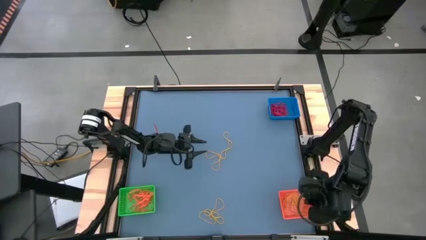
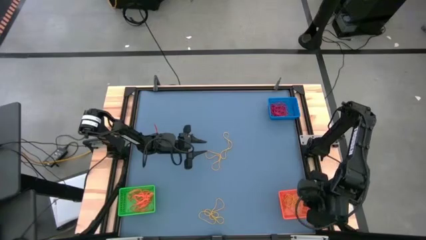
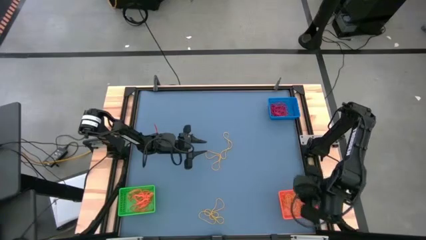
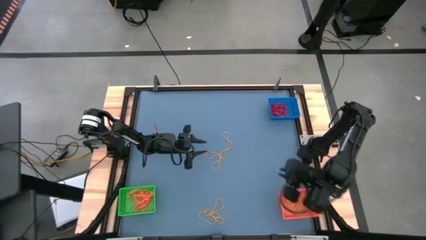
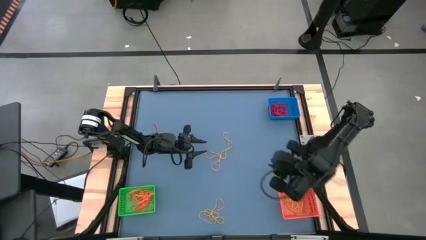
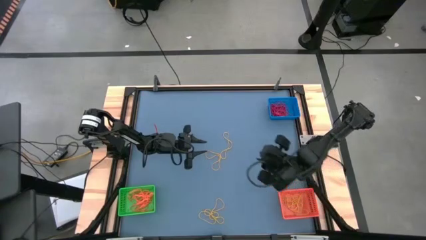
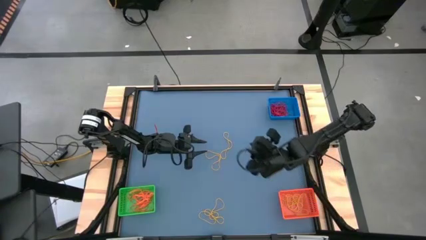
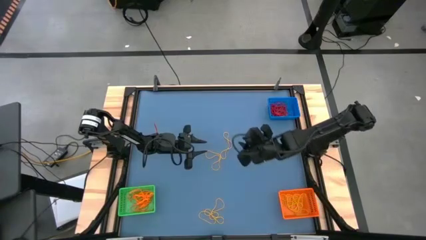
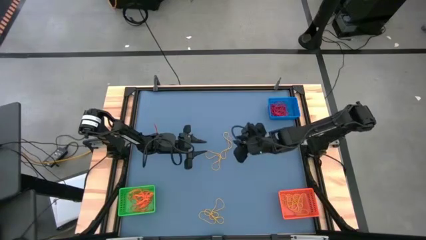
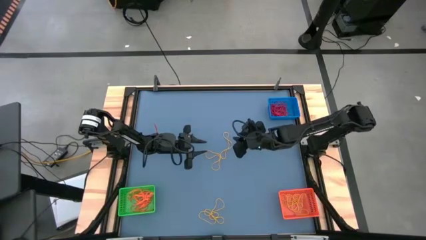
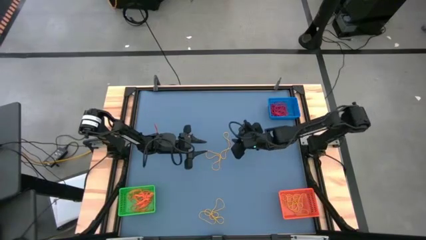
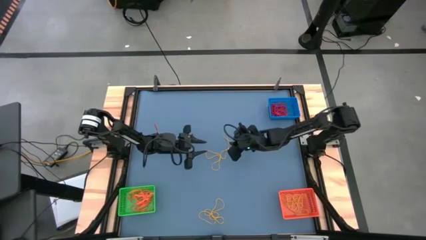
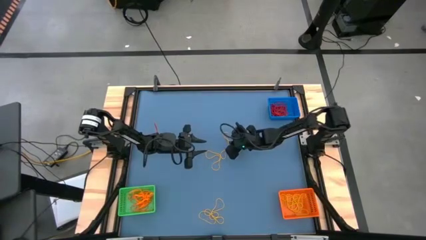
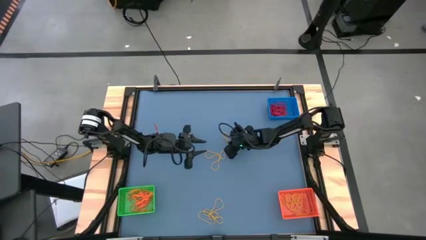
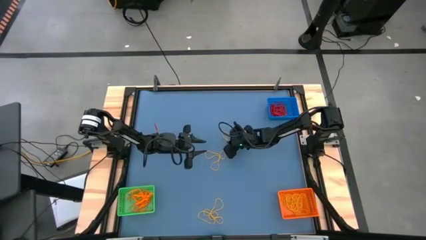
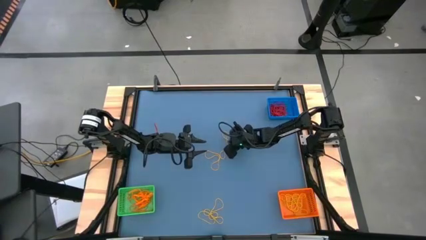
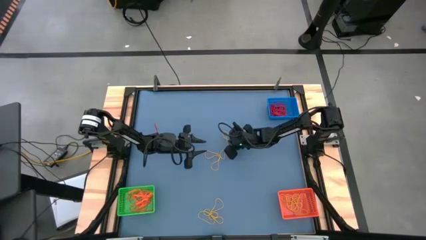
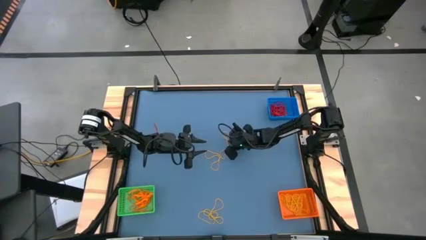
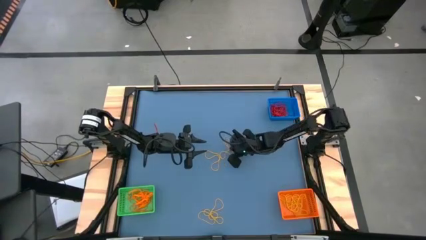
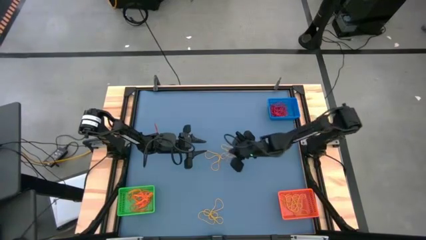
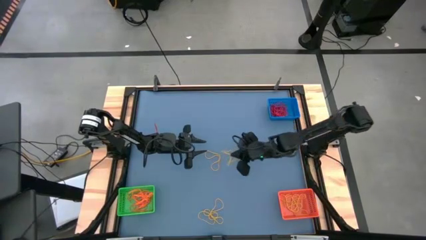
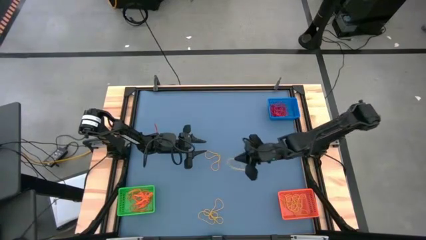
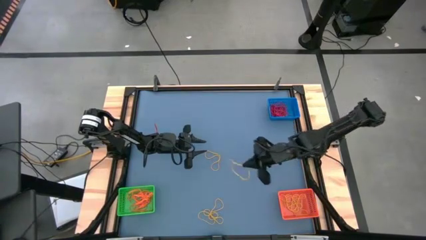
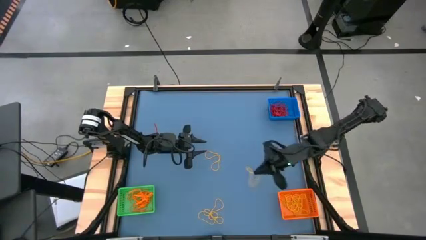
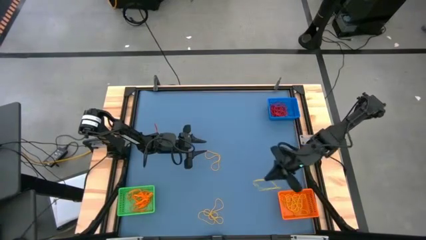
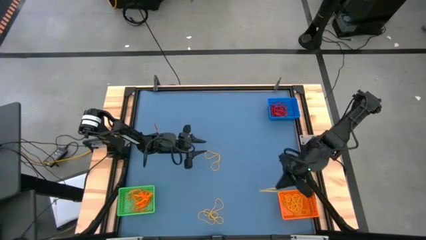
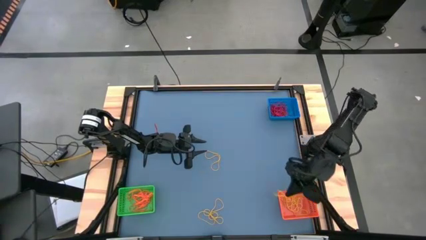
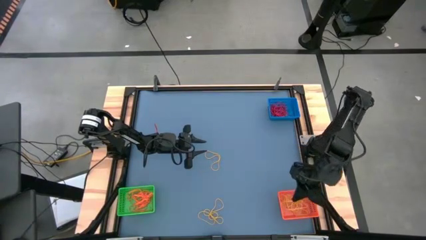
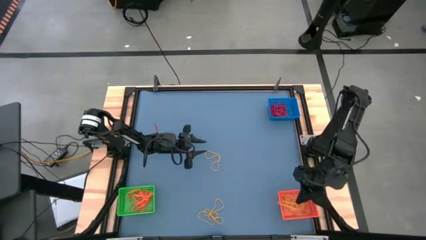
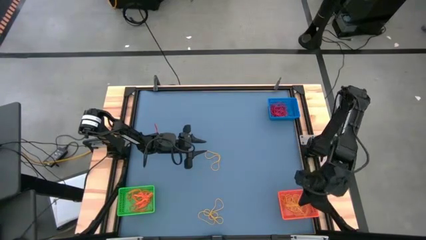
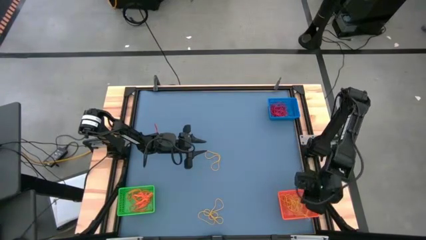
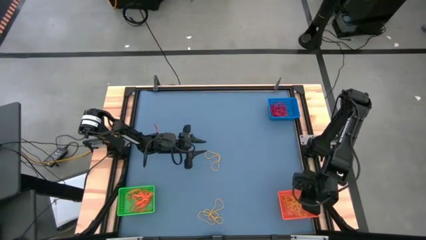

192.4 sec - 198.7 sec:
Task: Sort rubber bands into baskets
Put the yellow rubber band into the orange bin

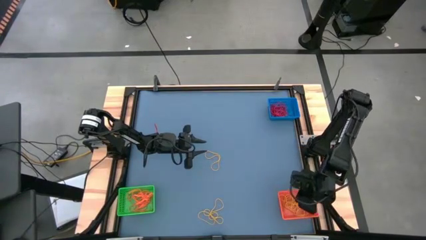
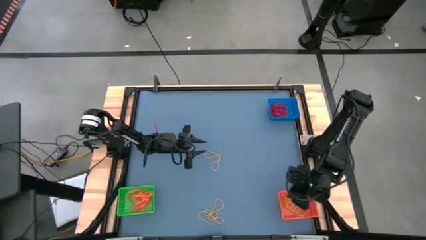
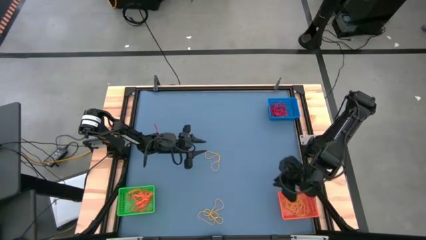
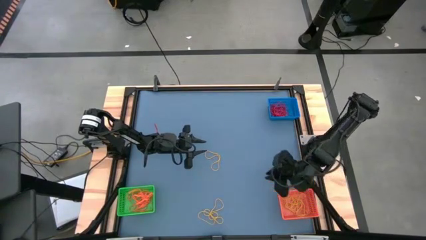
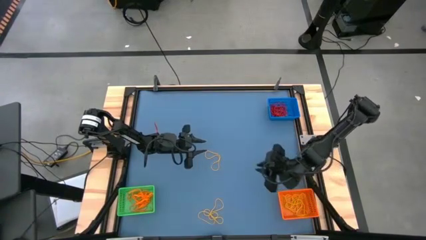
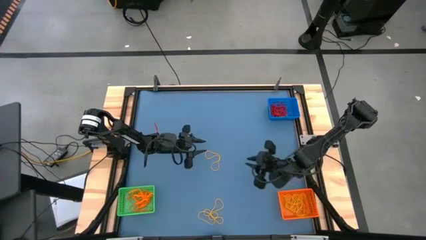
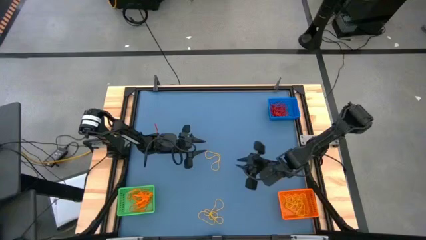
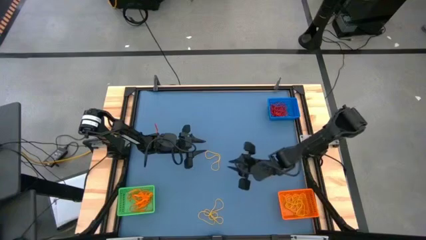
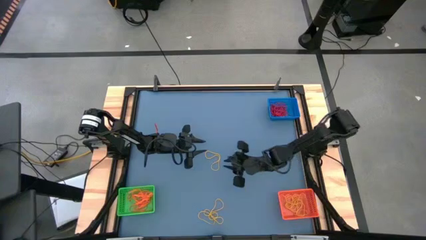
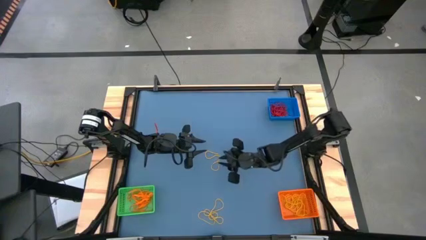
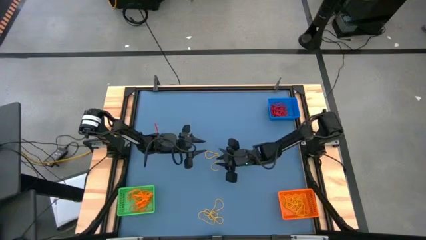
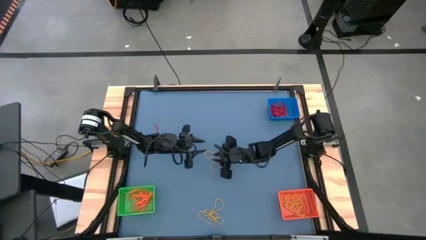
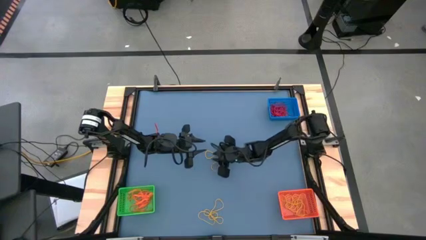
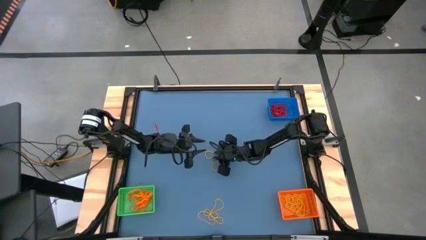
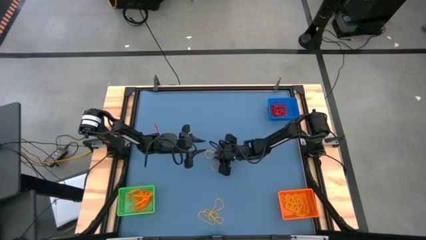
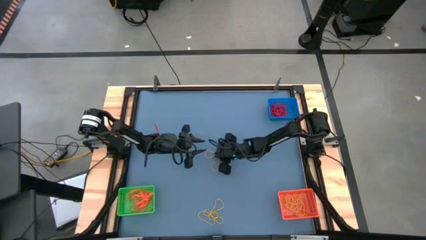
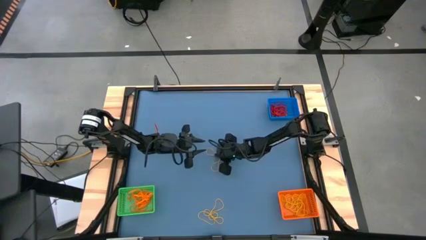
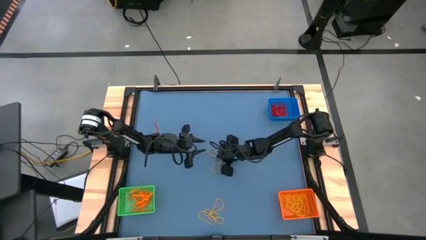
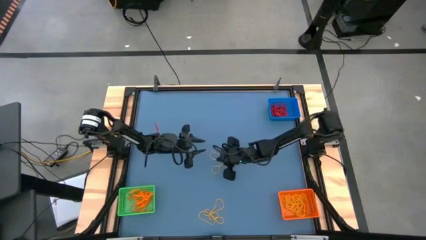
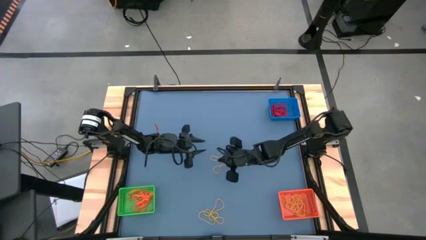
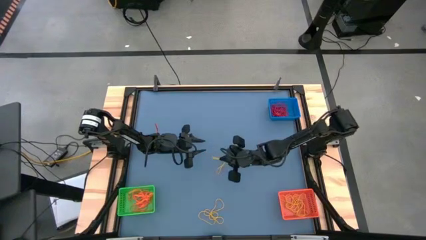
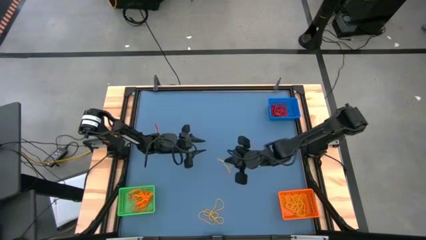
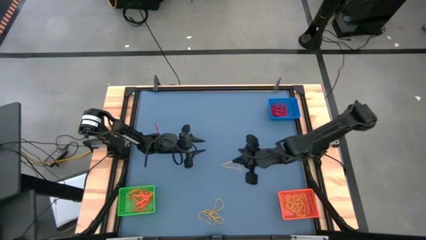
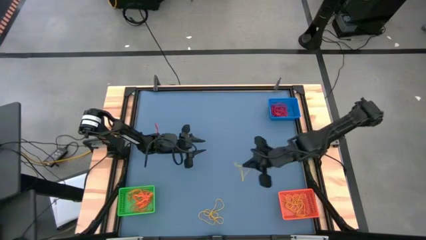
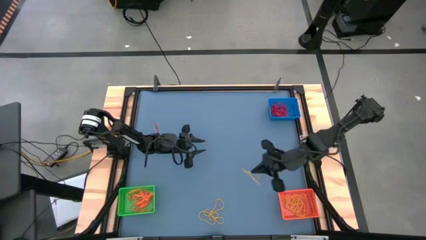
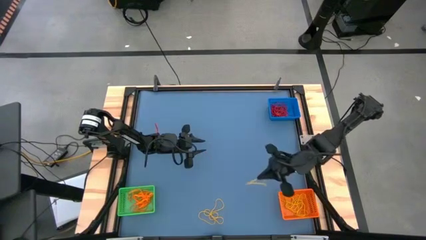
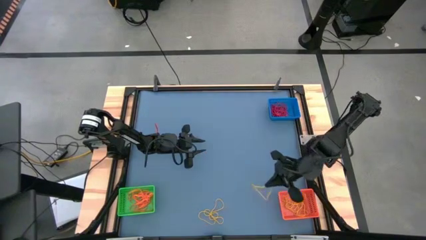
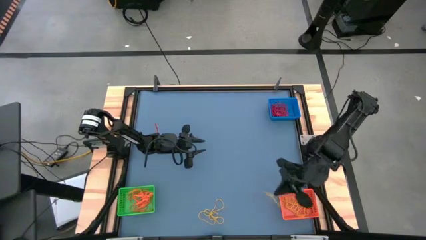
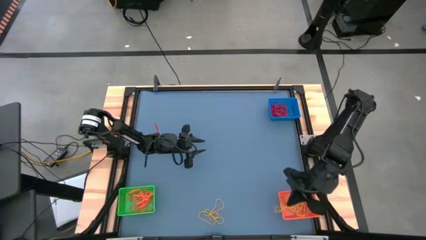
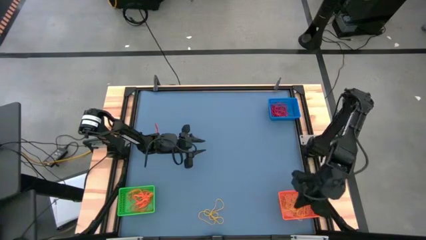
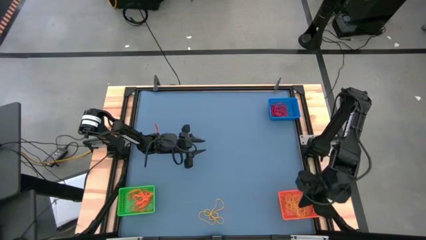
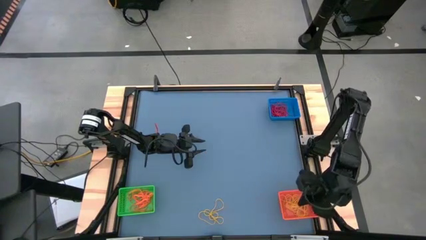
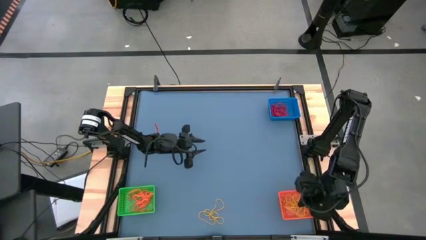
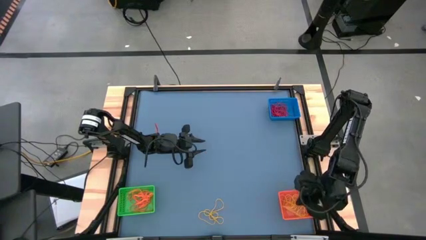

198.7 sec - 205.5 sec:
Put the yellow rubber band into the orange bin

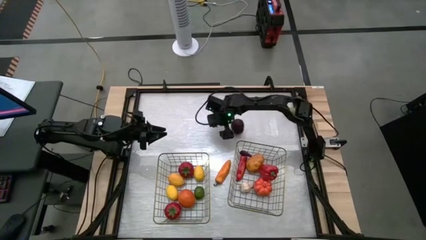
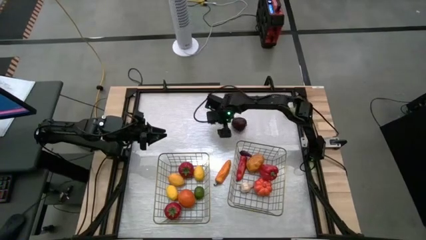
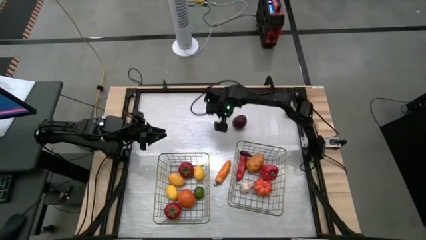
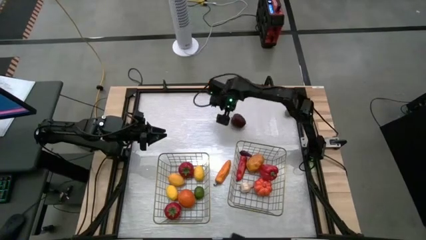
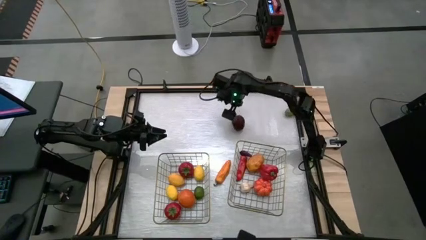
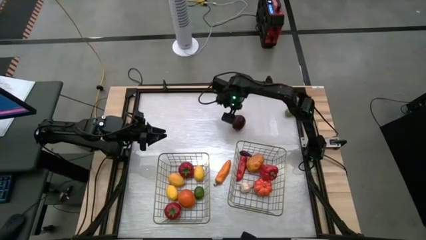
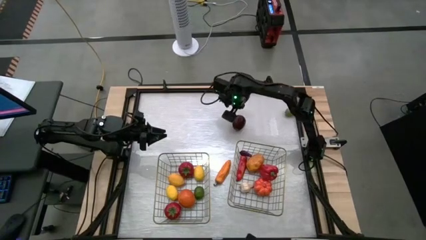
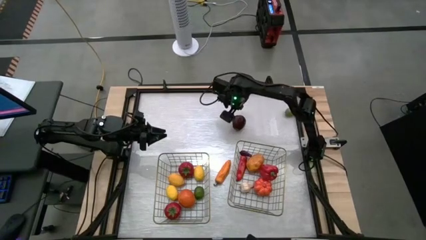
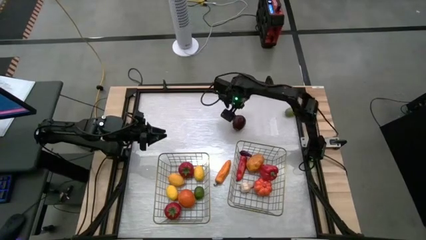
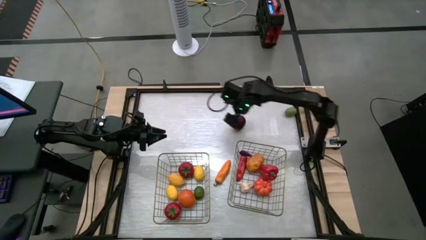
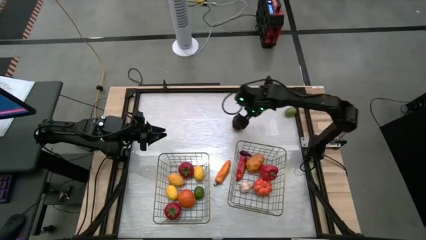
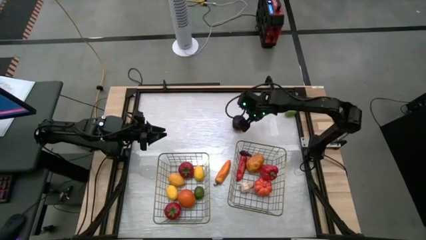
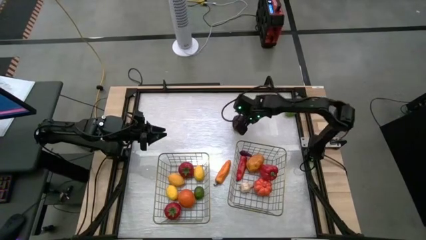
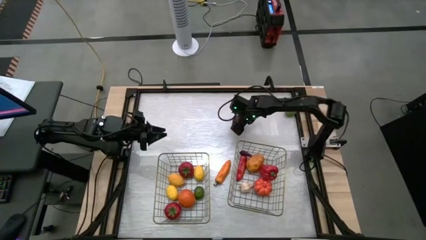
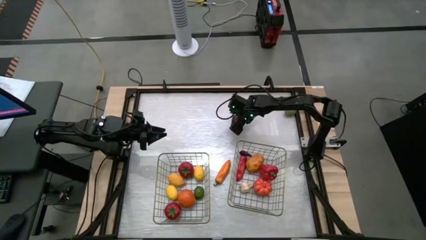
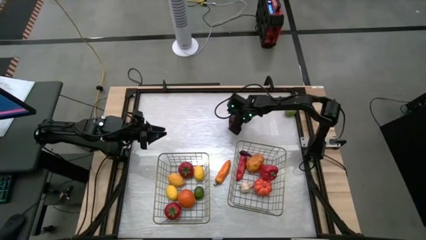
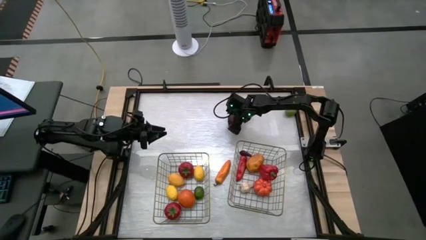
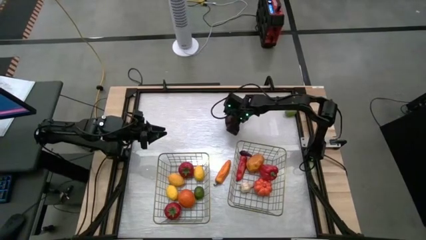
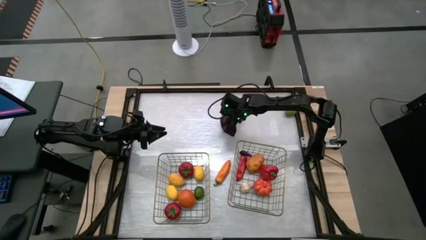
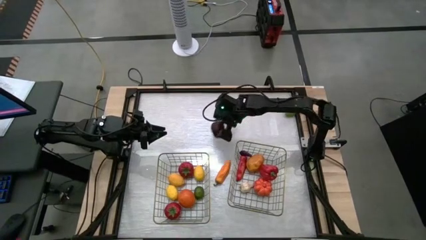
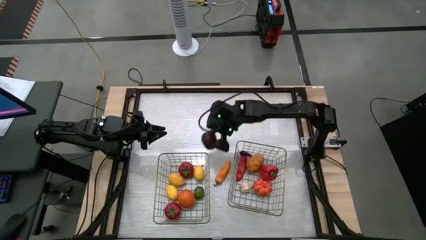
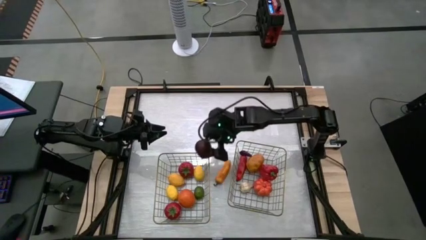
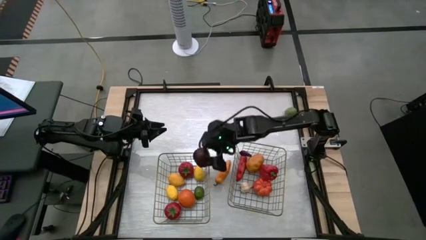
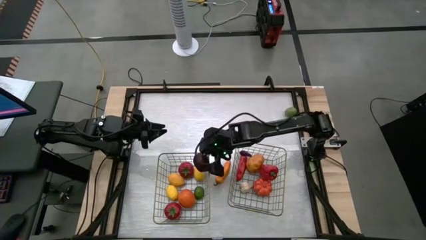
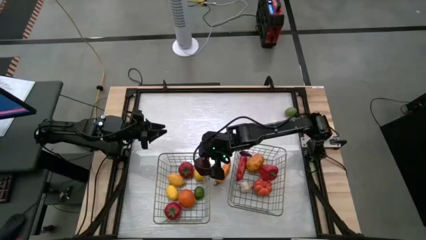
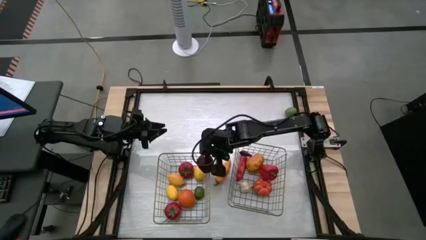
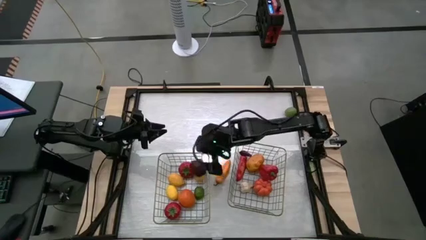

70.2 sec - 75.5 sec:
Task: Sort produce into baskets
Put the apple into the left brown wire basket
